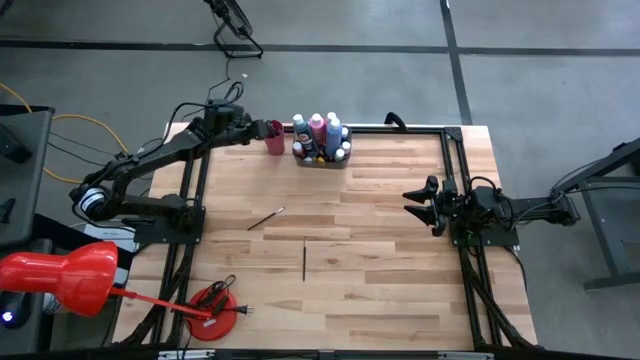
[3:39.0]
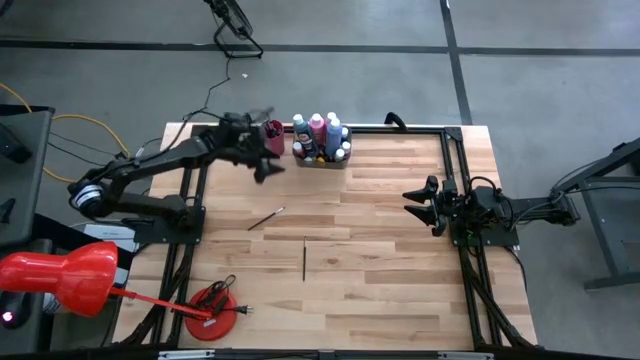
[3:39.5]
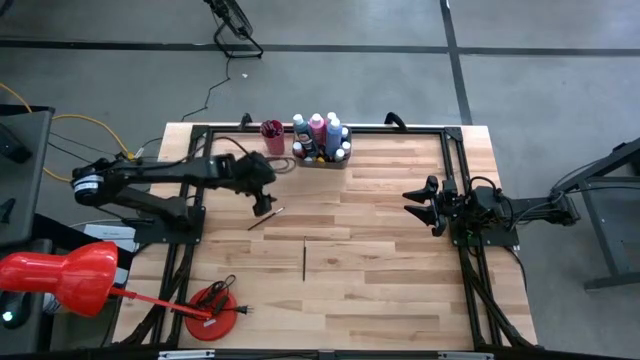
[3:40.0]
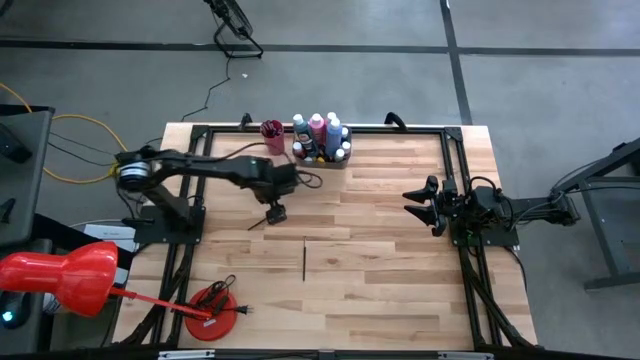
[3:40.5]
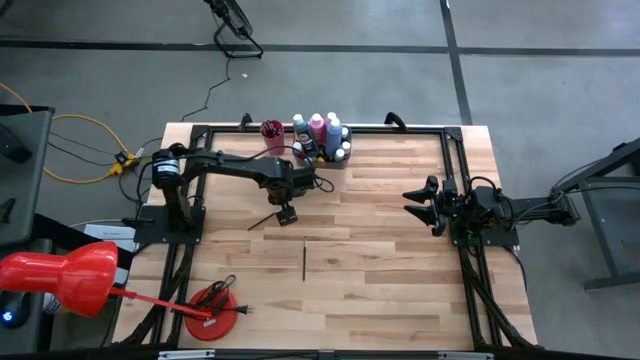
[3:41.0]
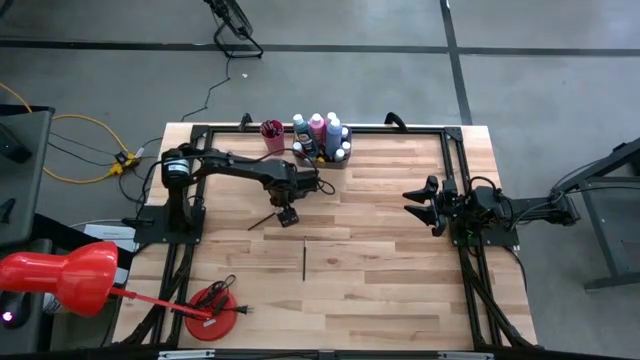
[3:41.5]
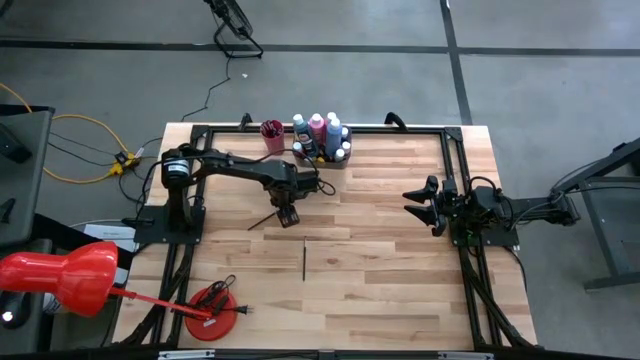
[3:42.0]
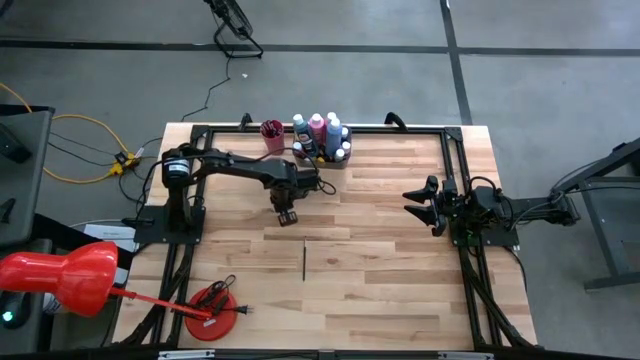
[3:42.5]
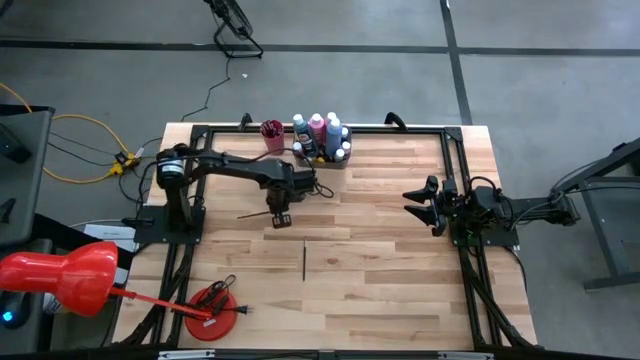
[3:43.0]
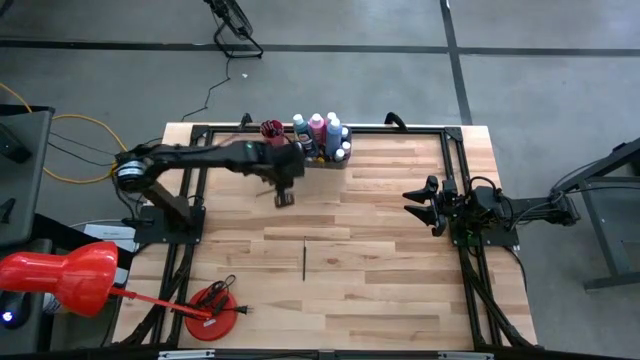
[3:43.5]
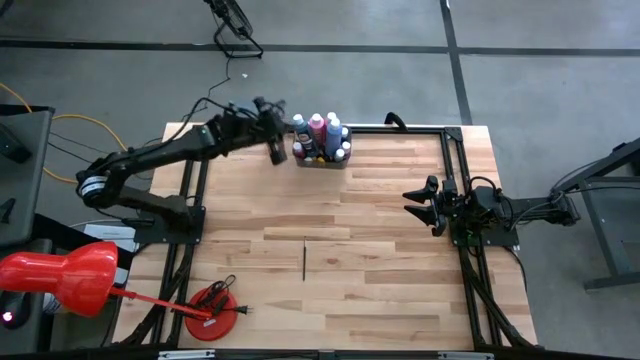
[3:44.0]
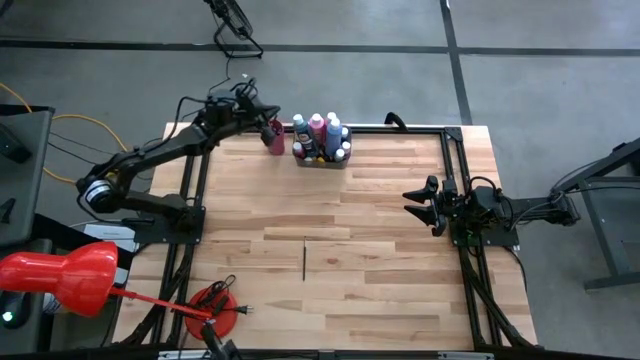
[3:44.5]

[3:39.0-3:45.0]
Task: Pick & Place Paint Supplies
Put the black paint brush into the pink cup

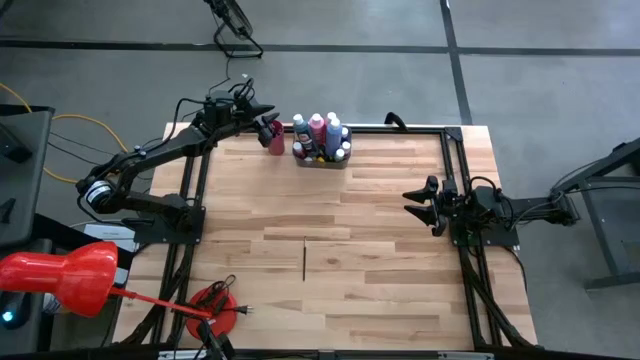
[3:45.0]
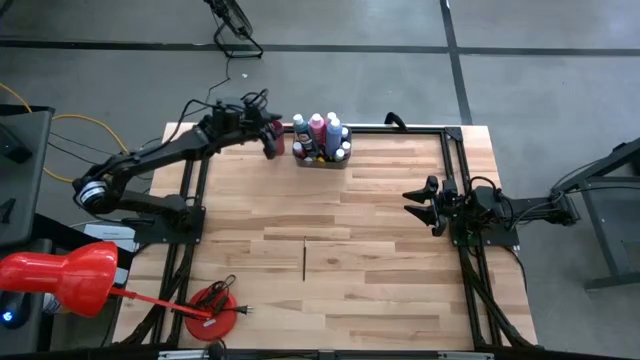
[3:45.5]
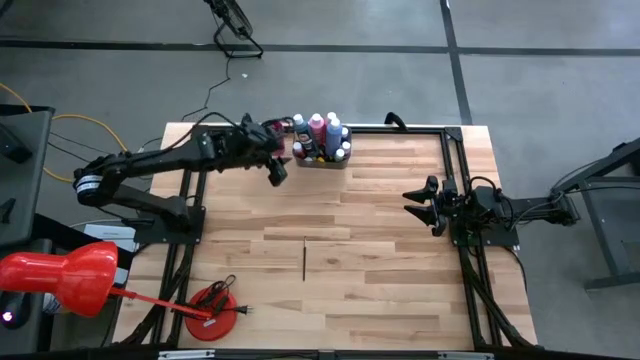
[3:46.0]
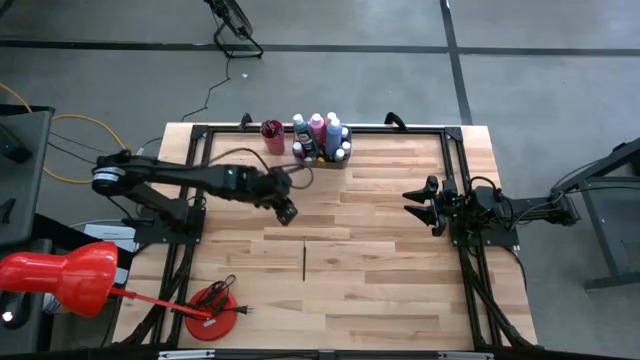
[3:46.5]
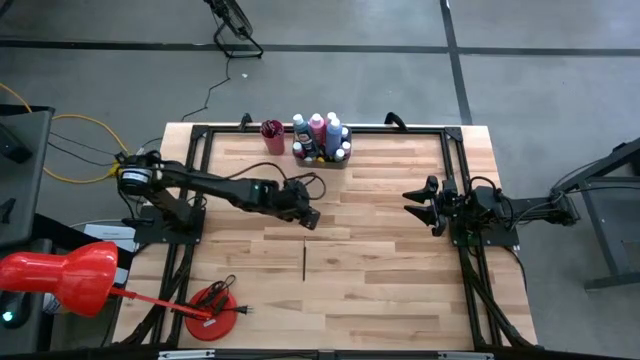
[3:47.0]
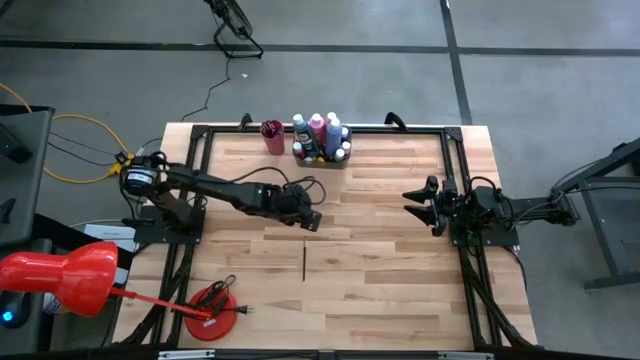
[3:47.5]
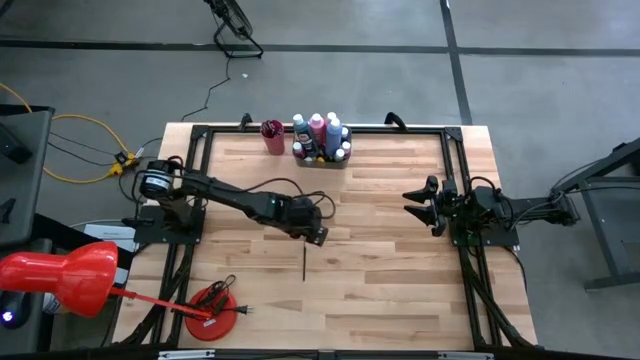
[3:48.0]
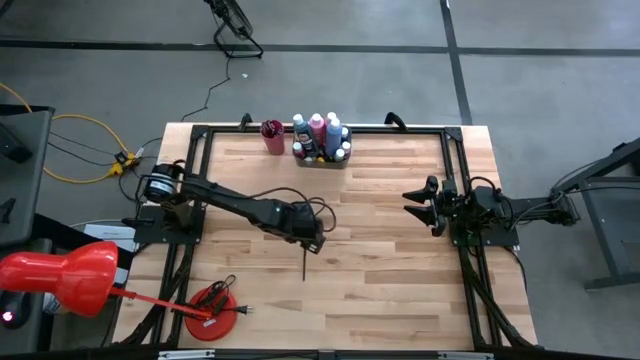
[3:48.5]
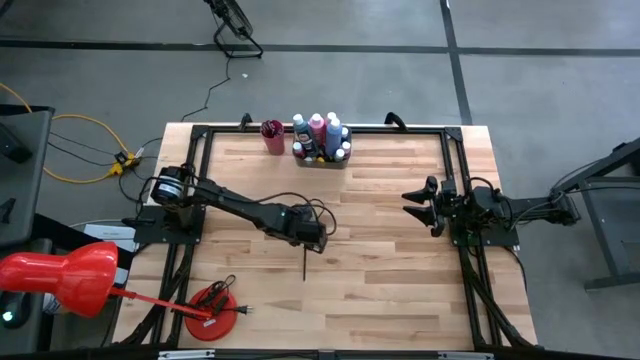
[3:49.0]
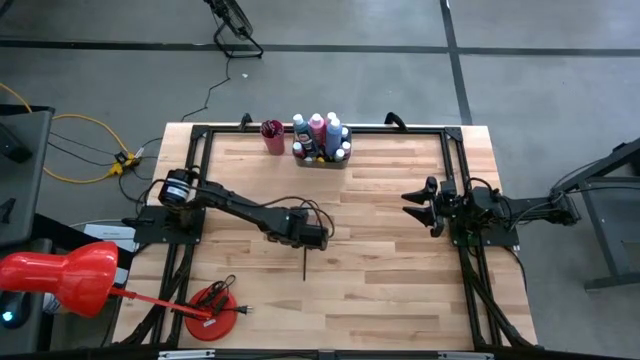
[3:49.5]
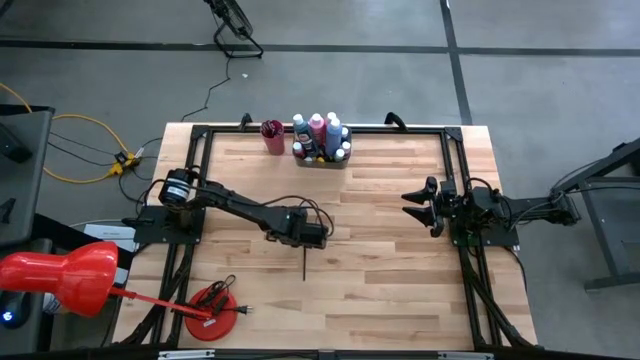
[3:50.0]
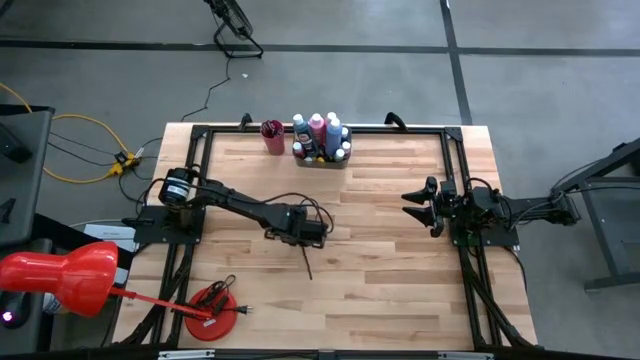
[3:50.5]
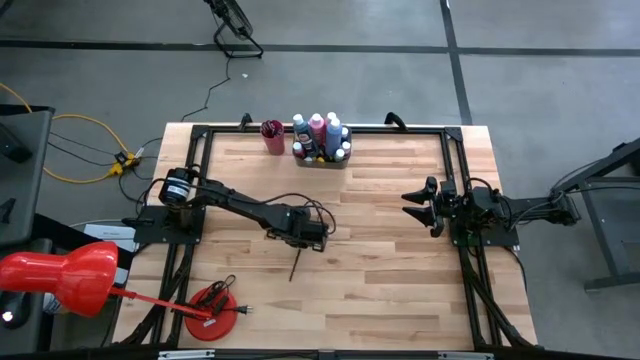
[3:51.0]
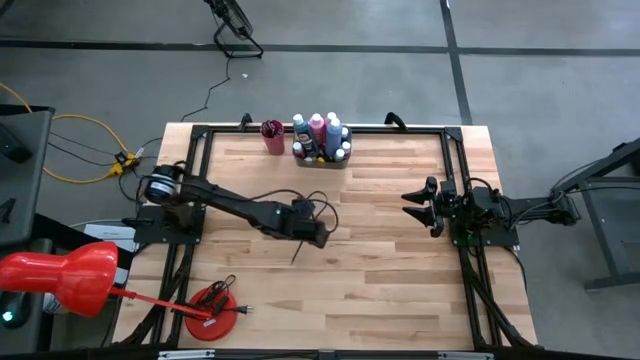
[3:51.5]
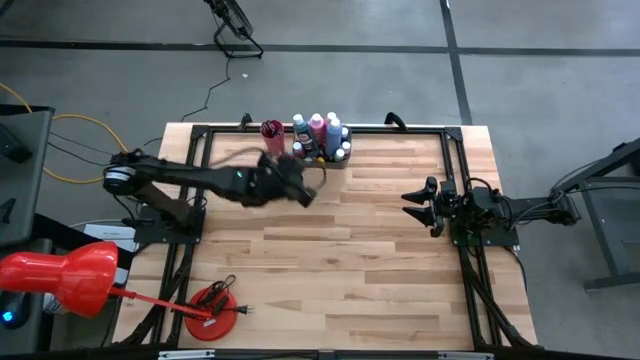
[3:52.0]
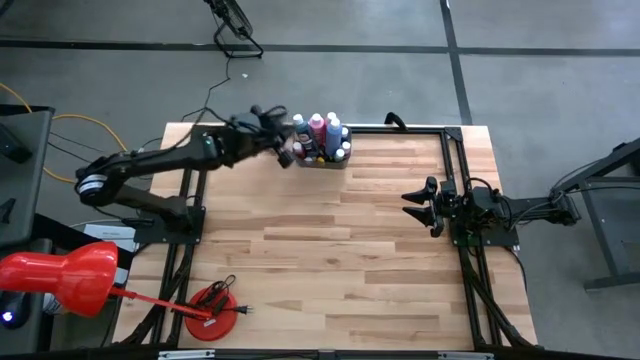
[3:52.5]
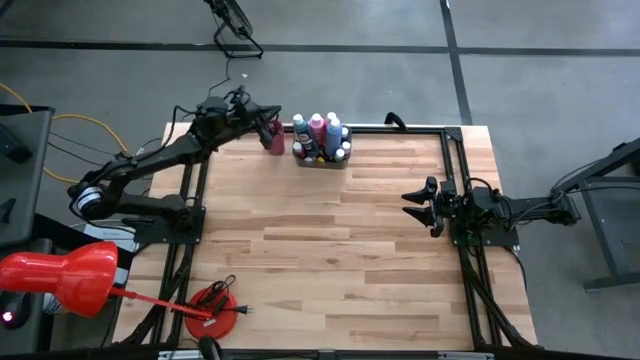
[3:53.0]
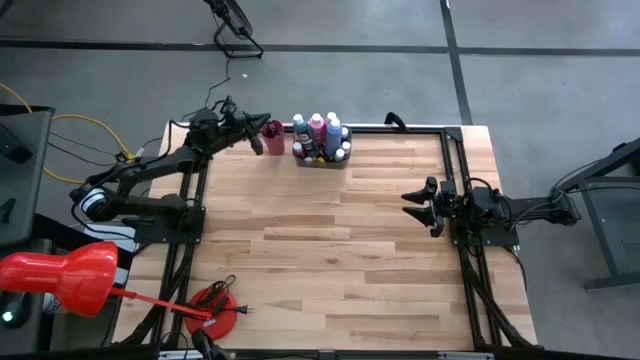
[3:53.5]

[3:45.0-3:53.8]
Put the black paint brush into the pink cup

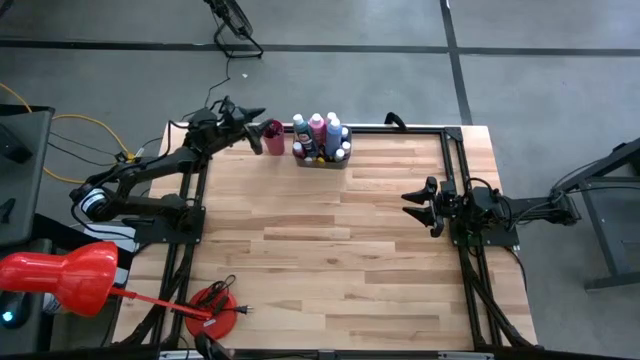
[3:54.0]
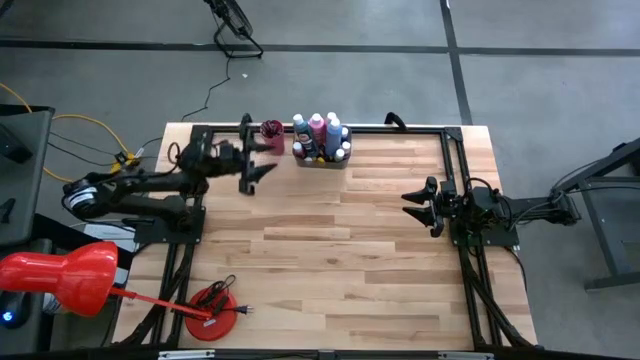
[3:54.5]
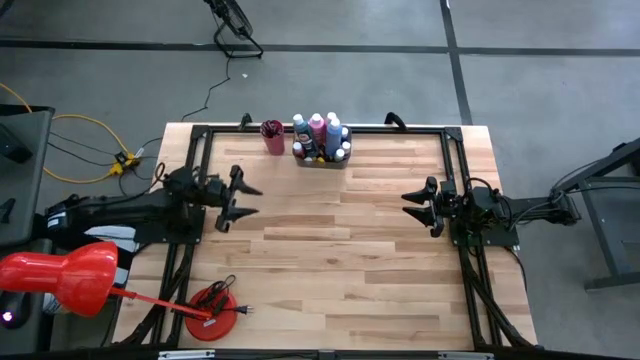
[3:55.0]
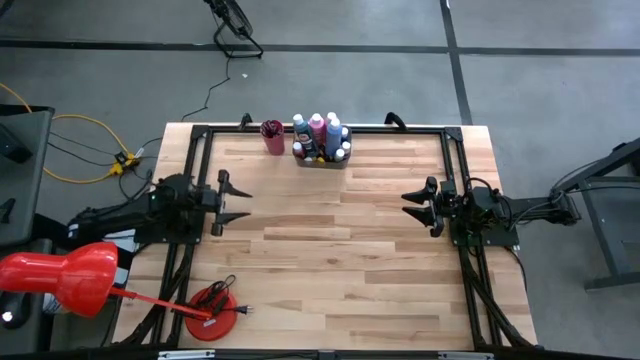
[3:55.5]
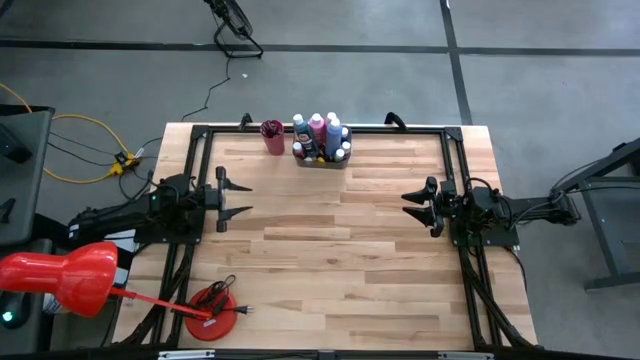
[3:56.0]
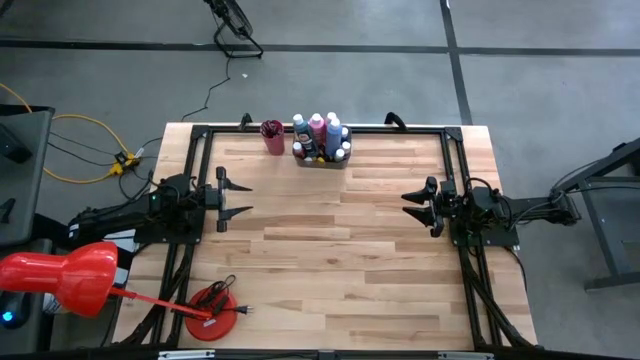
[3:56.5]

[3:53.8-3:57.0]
Return to Home Position
